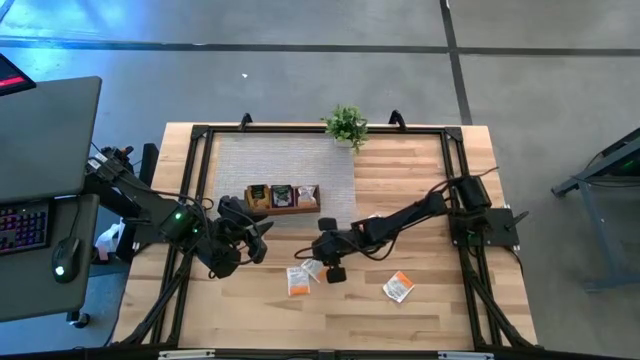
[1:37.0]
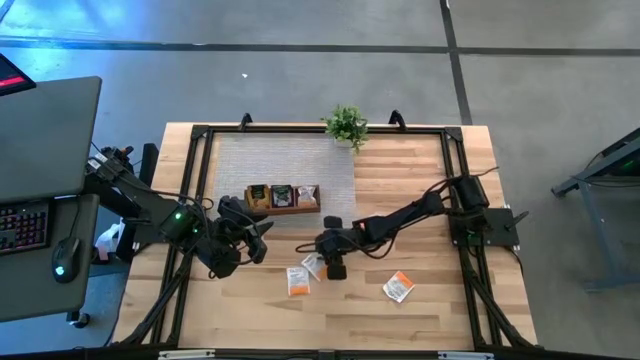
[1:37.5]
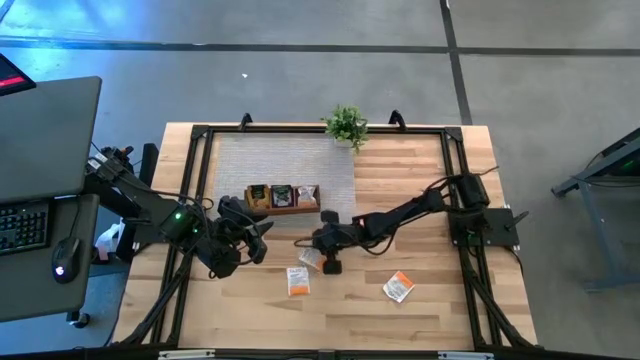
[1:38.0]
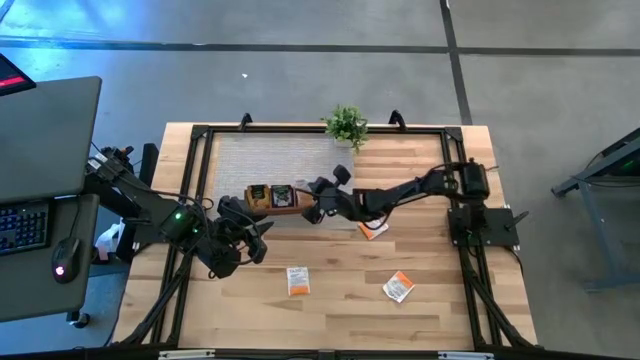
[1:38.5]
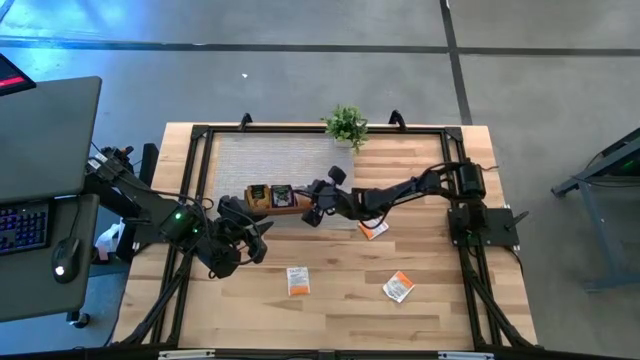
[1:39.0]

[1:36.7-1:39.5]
Task: Pick & Place Tea
Put the orange tea bag into the right section of the wooden organizer

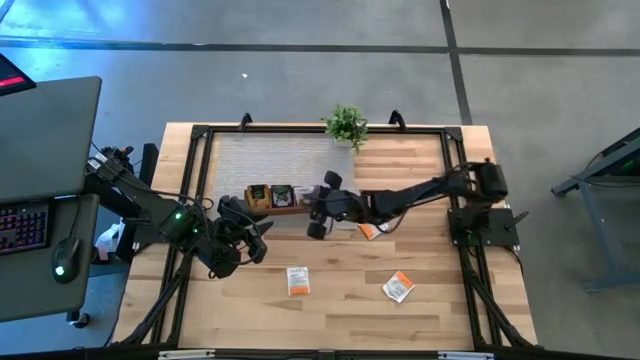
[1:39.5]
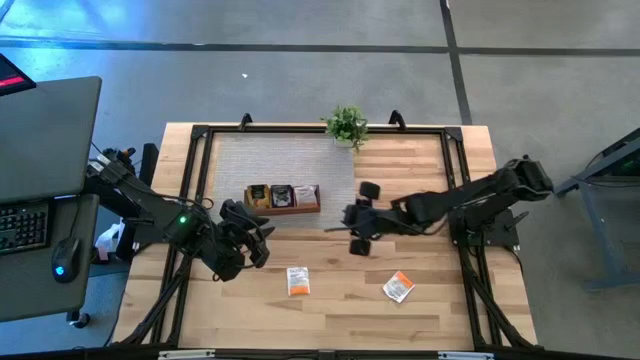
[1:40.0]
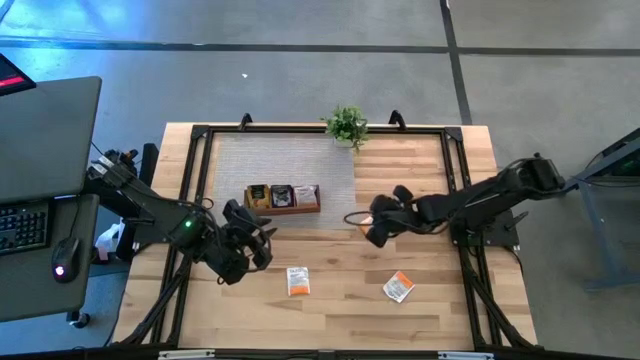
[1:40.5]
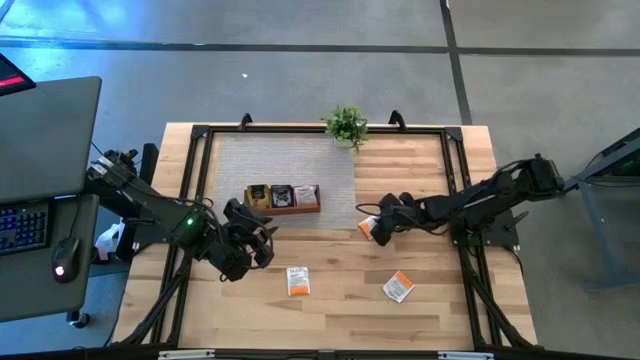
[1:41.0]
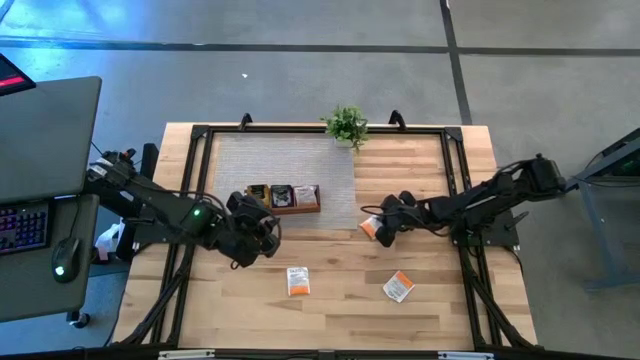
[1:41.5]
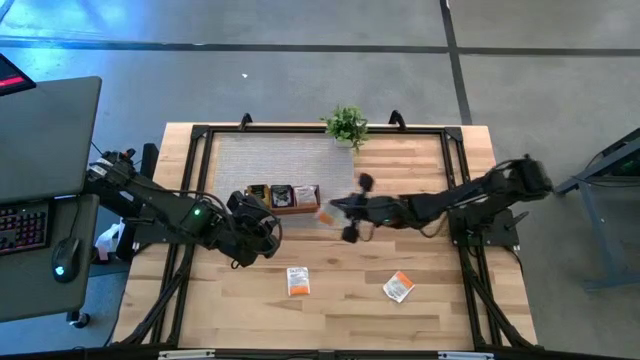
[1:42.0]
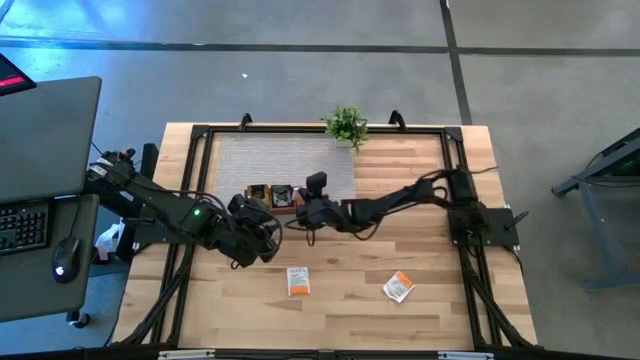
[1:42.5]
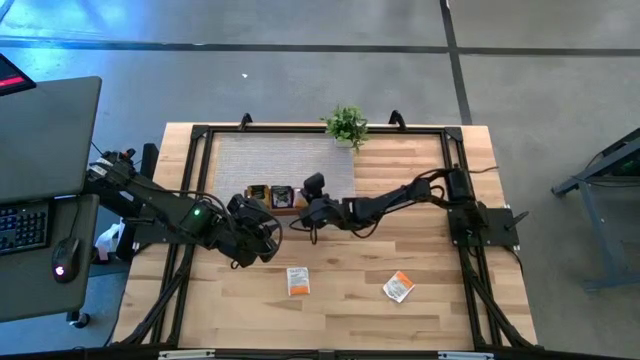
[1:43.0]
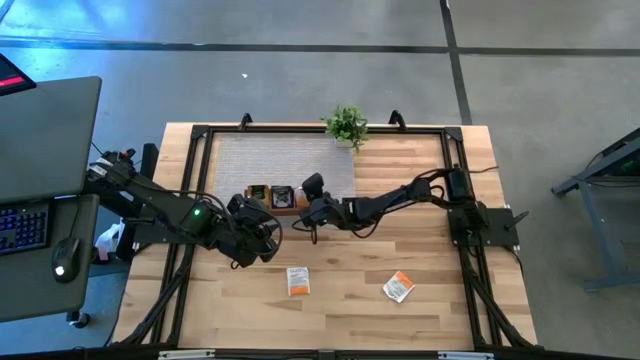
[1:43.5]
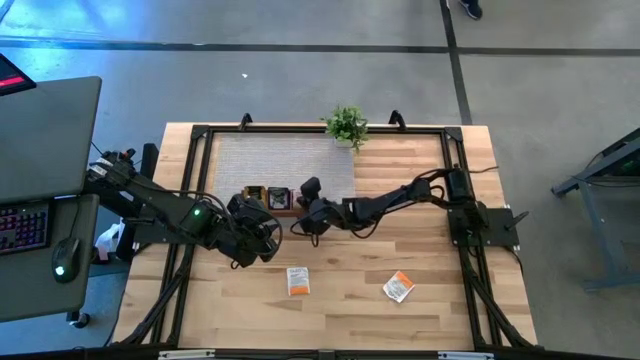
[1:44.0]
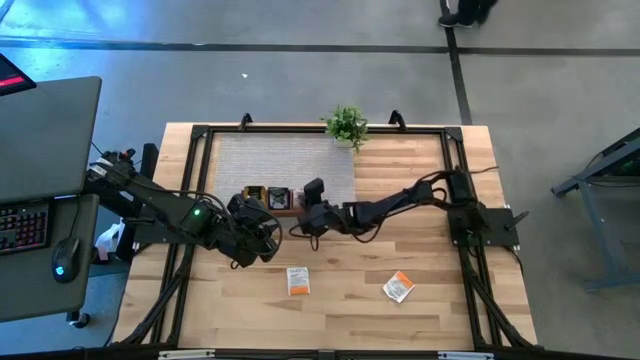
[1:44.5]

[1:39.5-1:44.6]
Put the orange tea bag into the right section of the wooden organizer

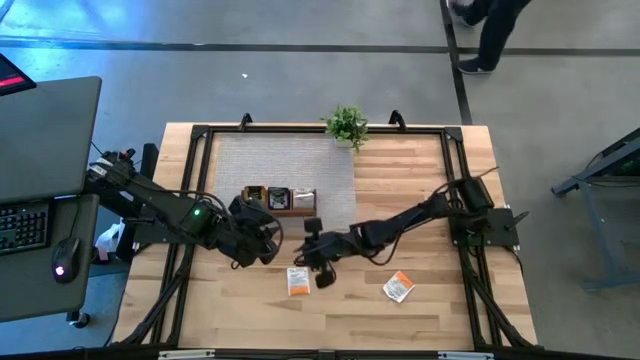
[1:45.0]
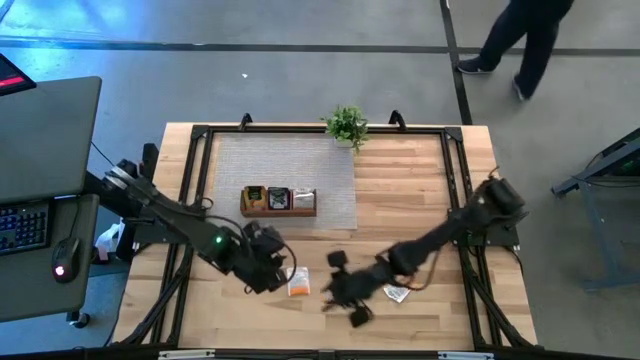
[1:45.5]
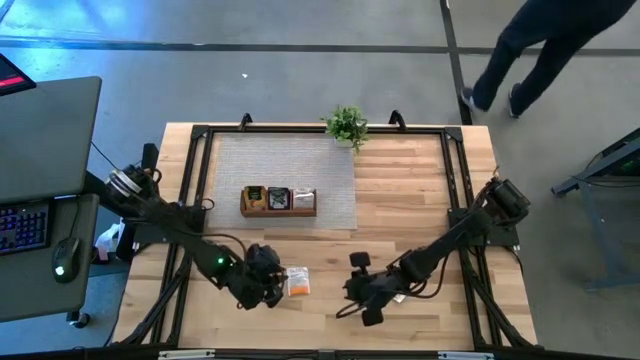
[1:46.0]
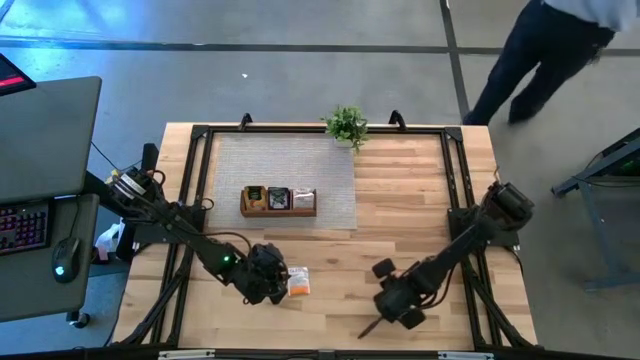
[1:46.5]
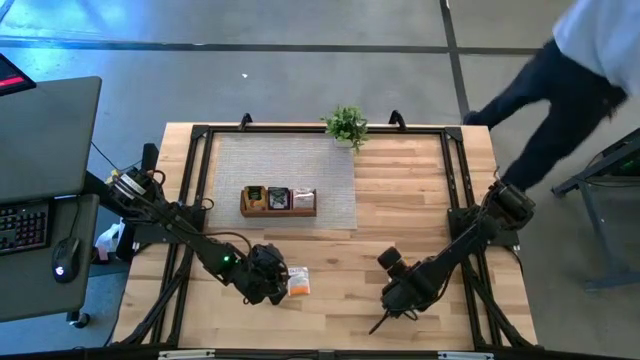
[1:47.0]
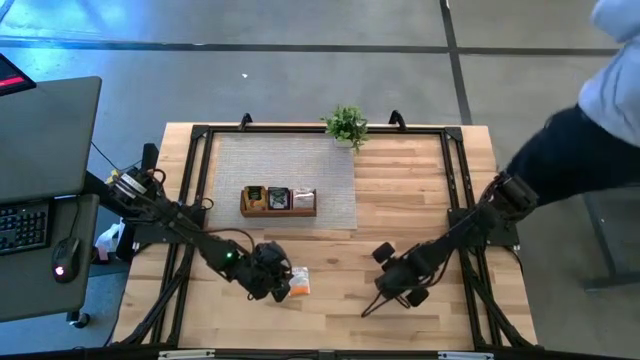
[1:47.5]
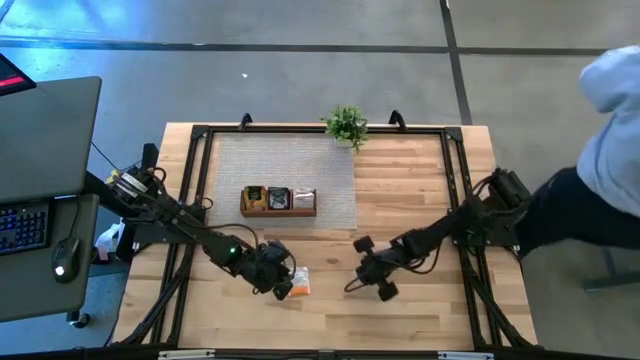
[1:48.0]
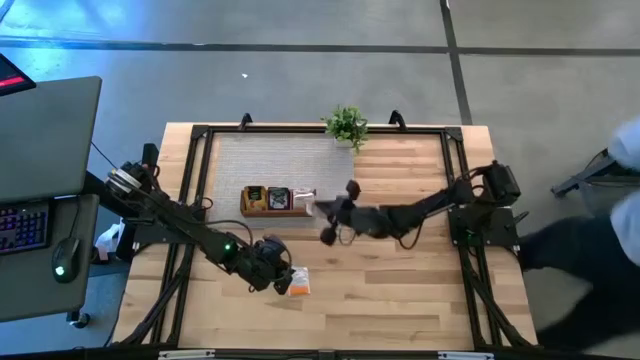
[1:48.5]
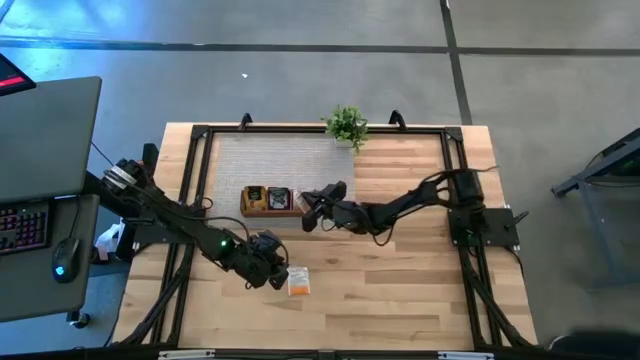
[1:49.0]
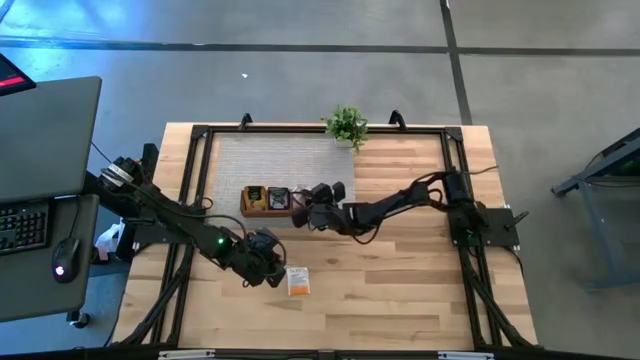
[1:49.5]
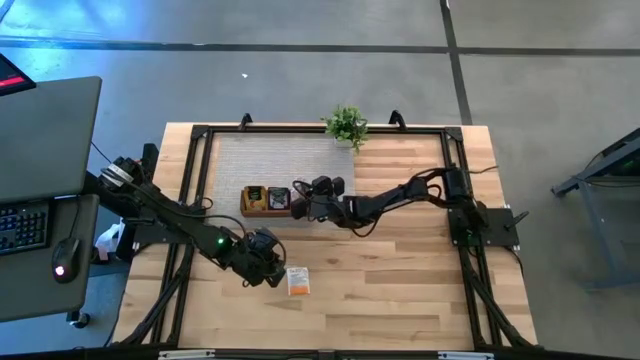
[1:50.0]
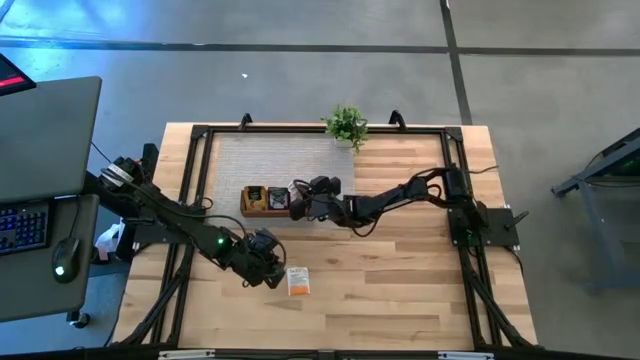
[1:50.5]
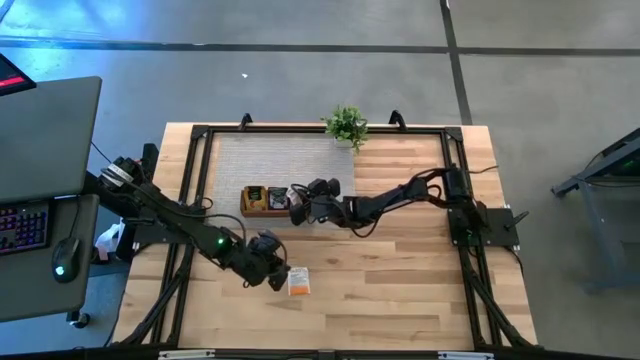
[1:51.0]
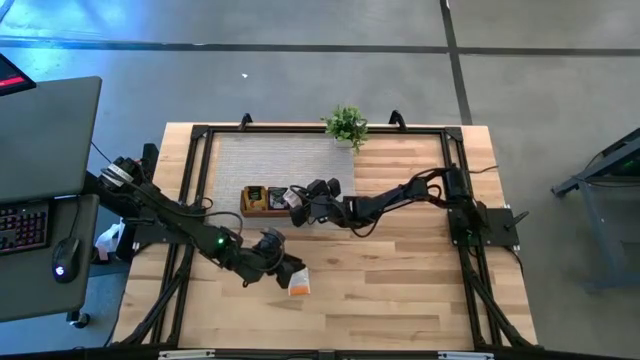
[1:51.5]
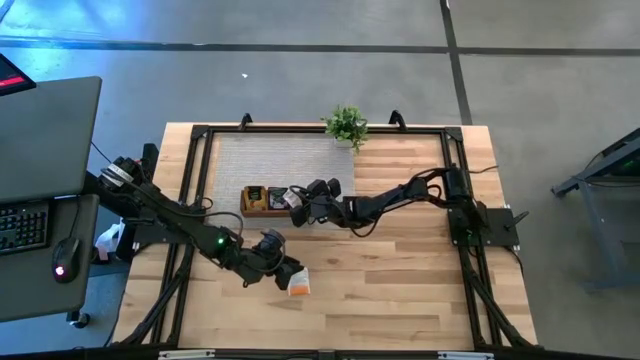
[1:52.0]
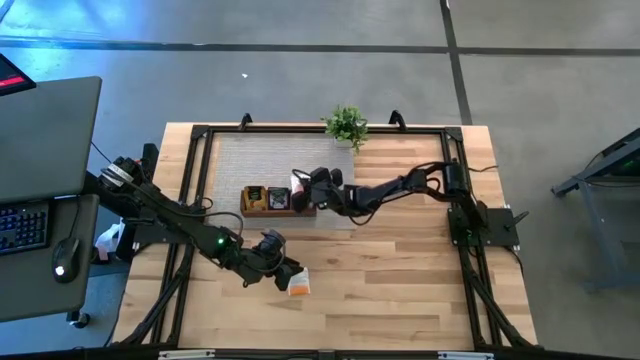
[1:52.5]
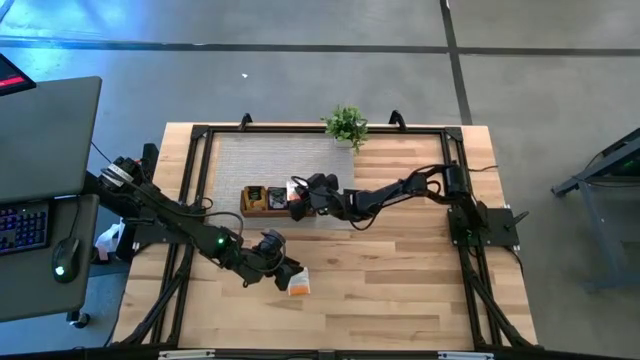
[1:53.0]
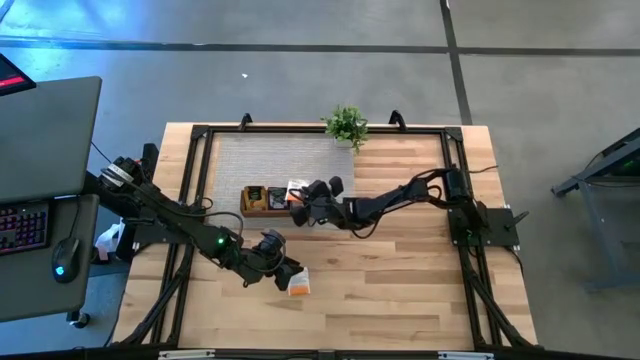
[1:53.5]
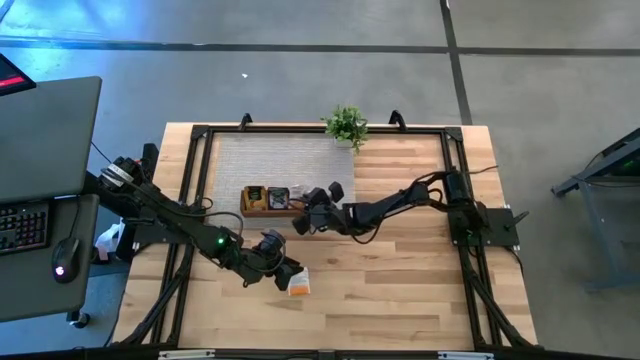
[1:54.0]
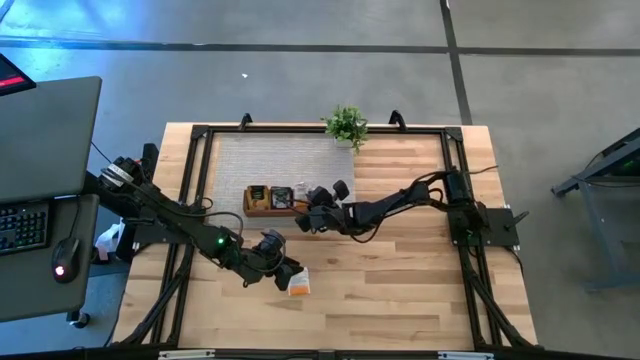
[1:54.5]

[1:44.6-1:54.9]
Put the orange tea bag into the right section of the wooden organizer

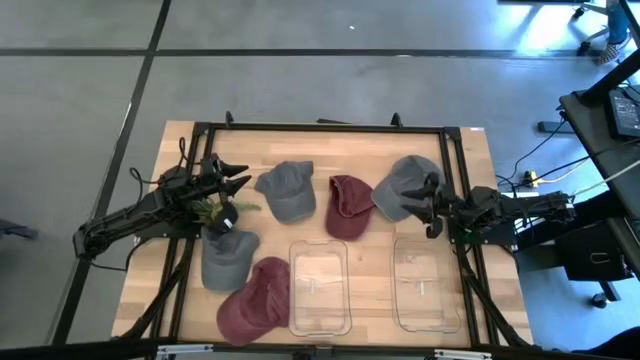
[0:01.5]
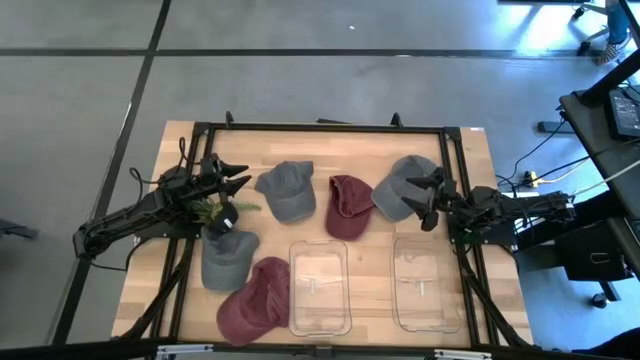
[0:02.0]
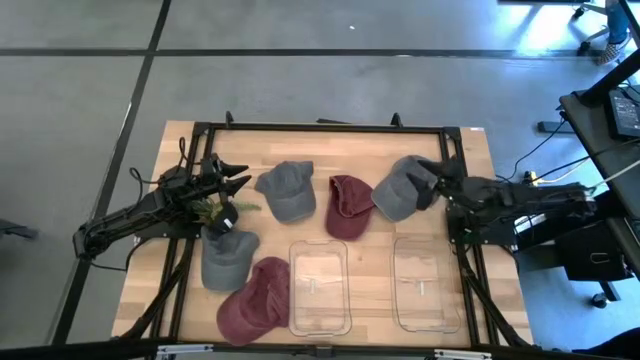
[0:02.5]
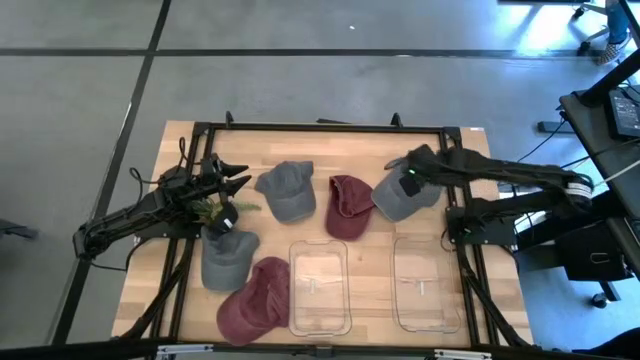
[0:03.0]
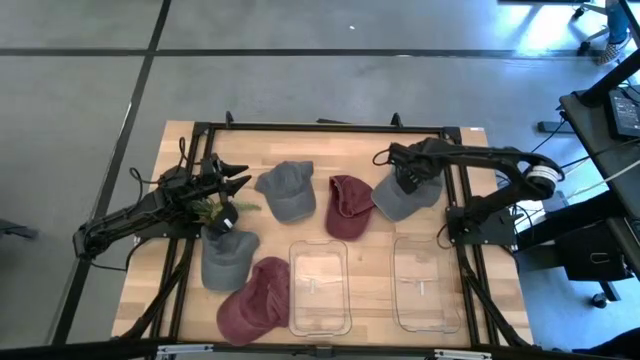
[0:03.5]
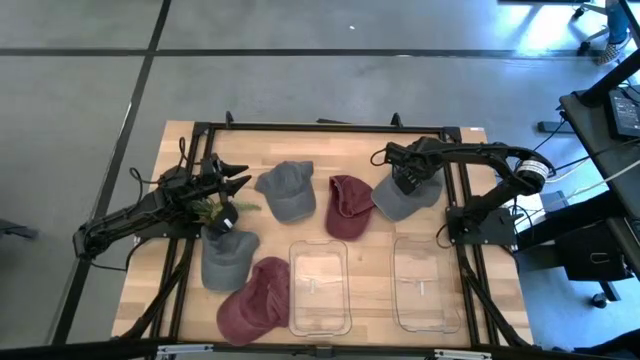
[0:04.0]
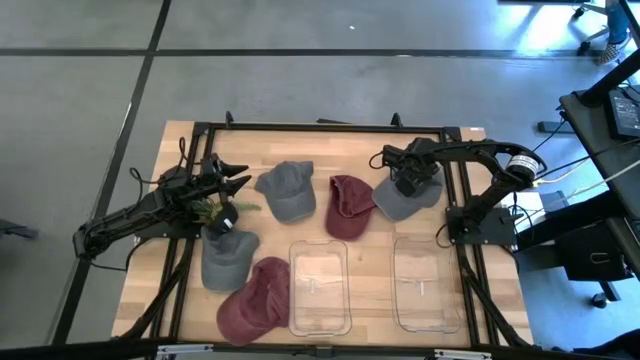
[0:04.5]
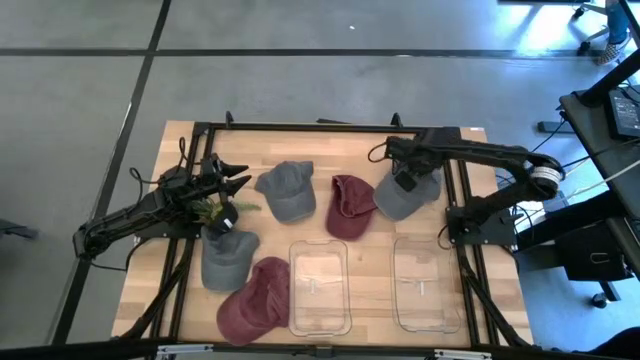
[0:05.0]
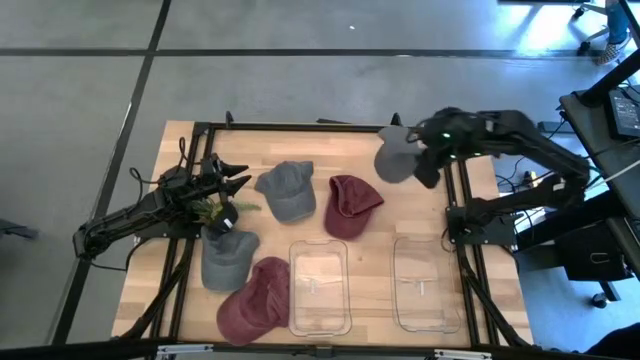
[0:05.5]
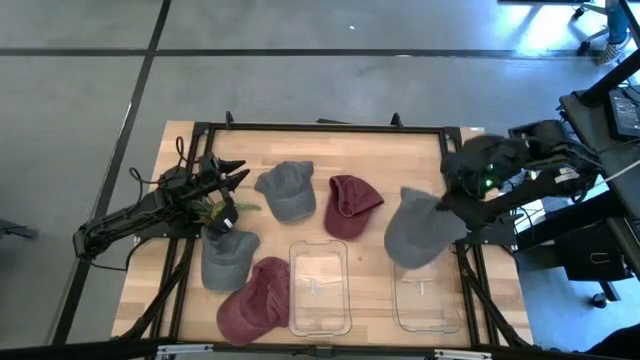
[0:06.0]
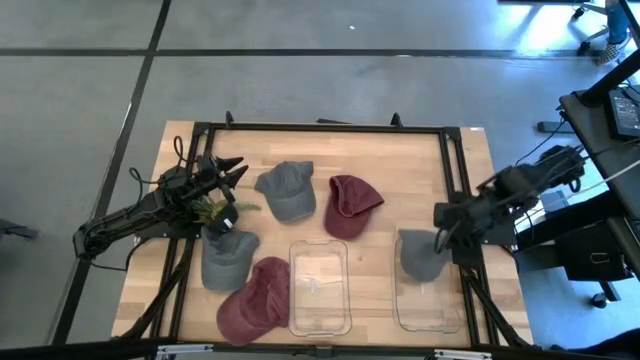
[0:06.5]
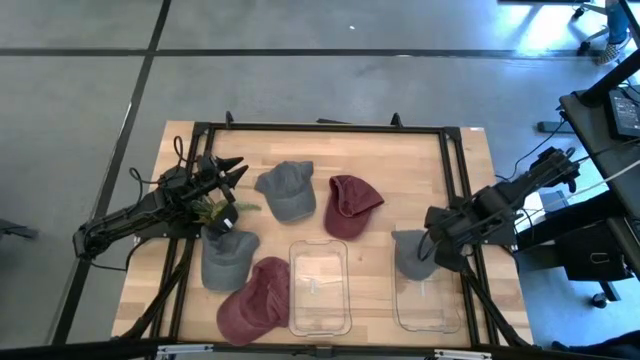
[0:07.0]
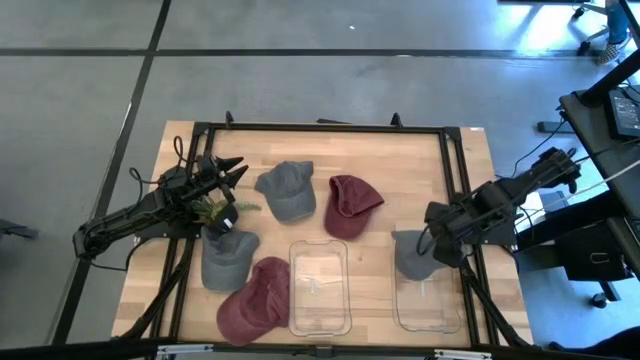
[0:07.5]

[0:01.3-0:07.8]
Task: Pick & Place hat
Put the right gray cap into the right transparent bin
